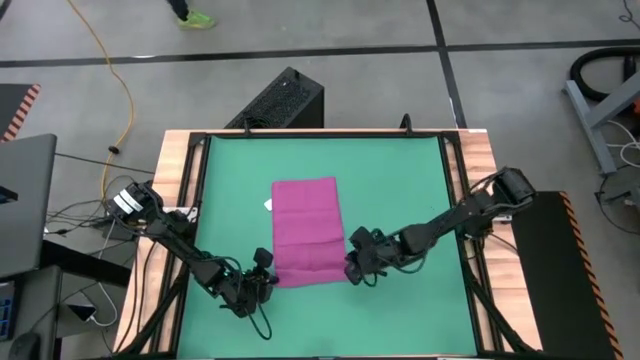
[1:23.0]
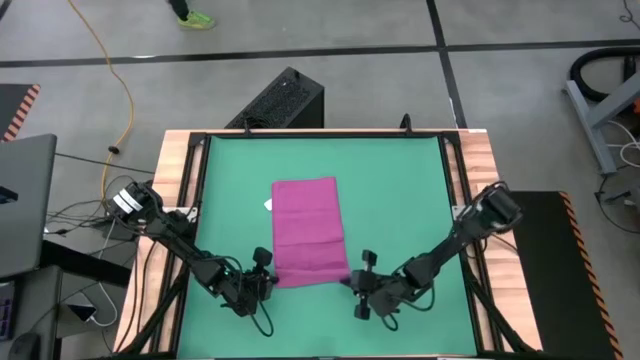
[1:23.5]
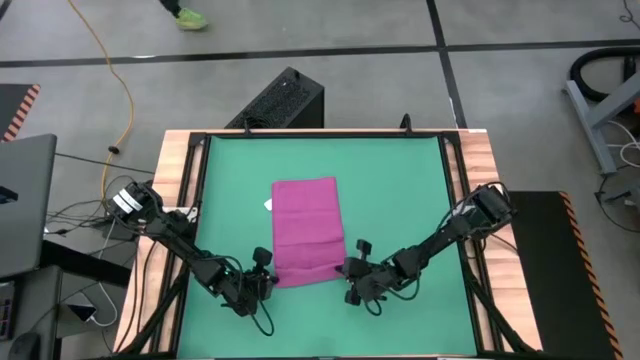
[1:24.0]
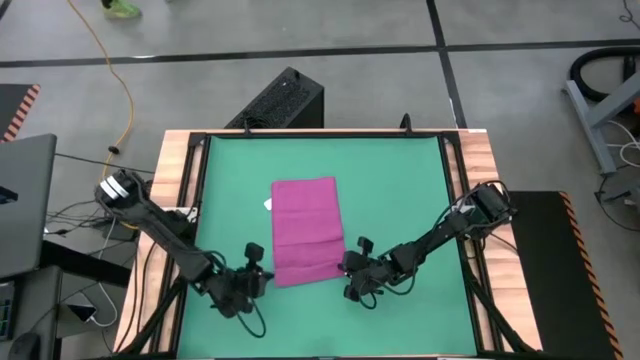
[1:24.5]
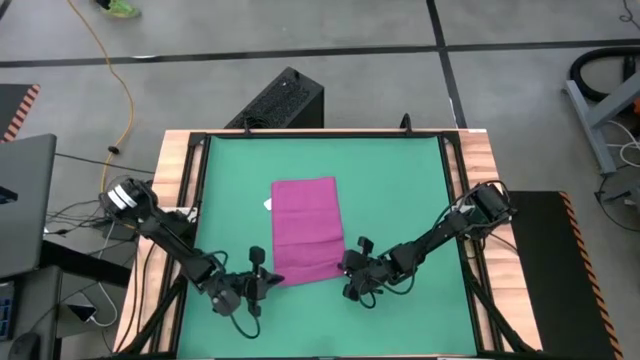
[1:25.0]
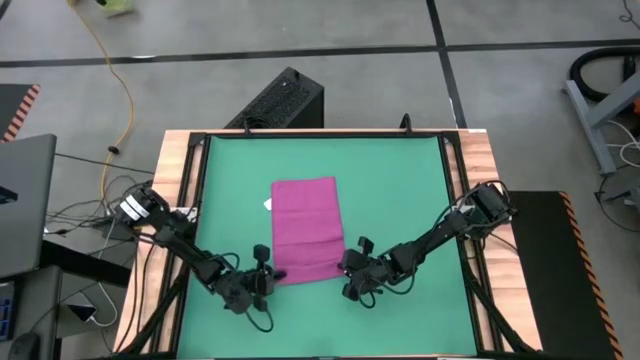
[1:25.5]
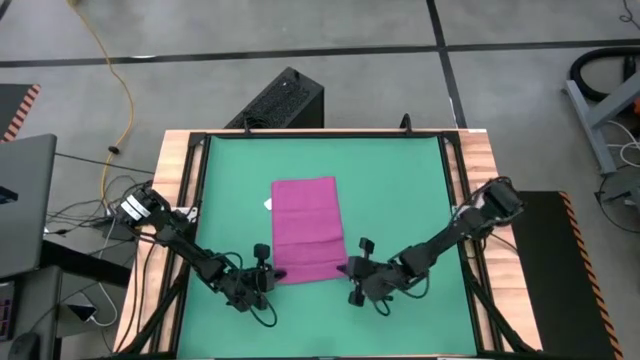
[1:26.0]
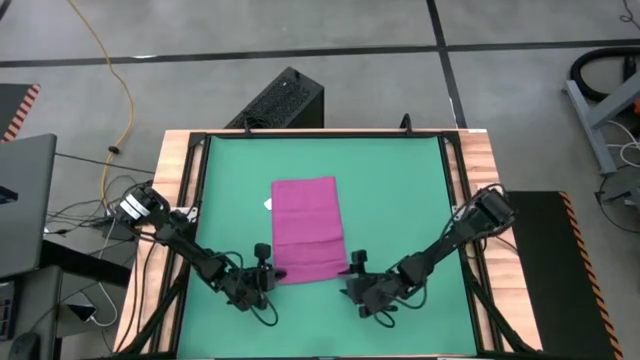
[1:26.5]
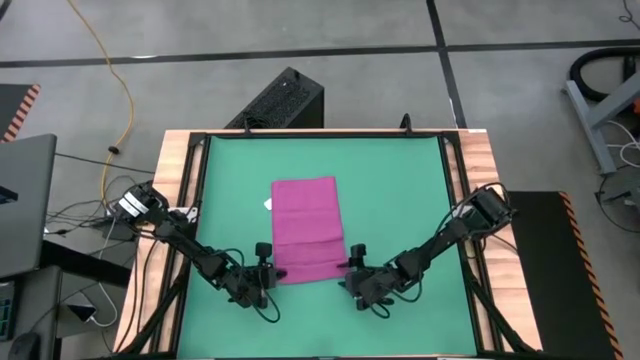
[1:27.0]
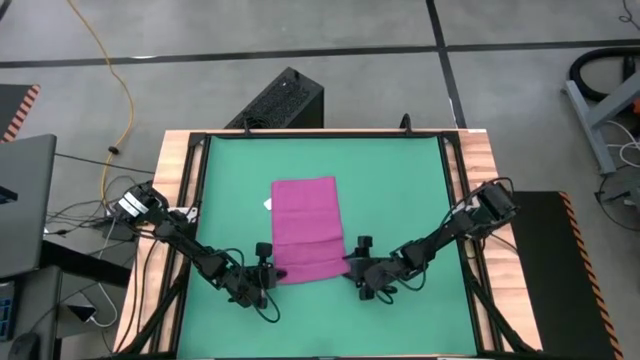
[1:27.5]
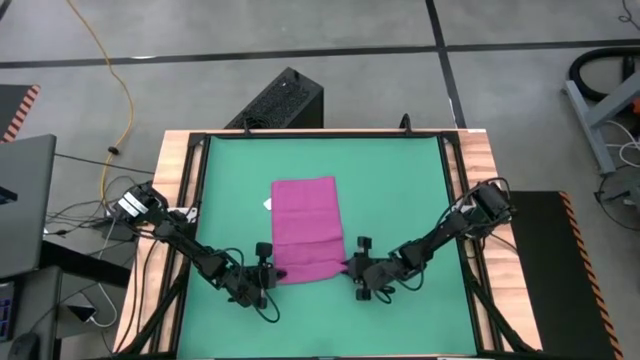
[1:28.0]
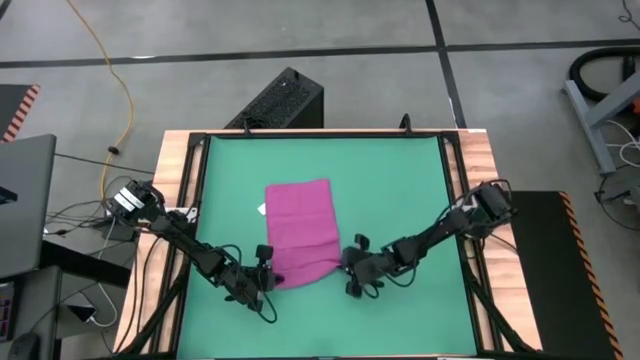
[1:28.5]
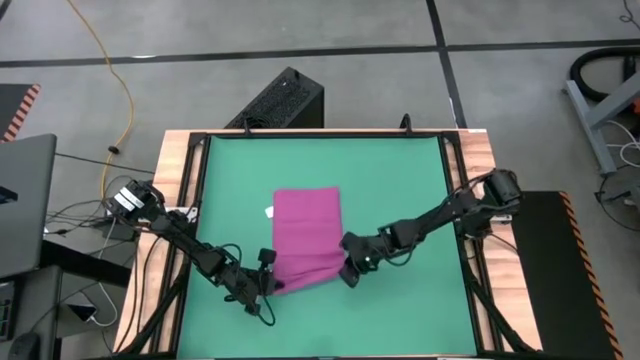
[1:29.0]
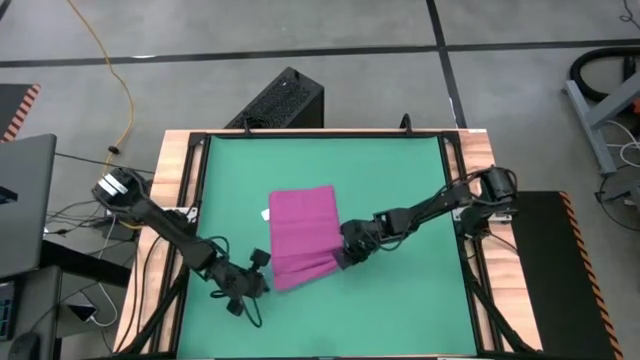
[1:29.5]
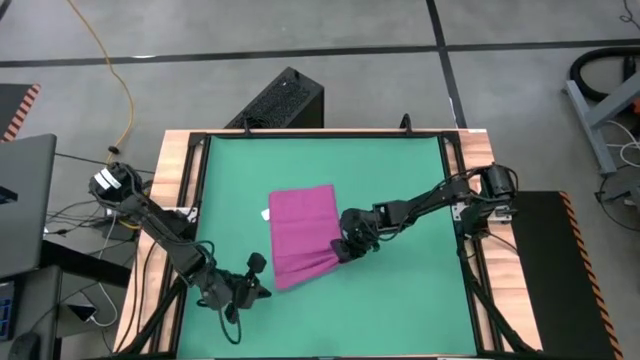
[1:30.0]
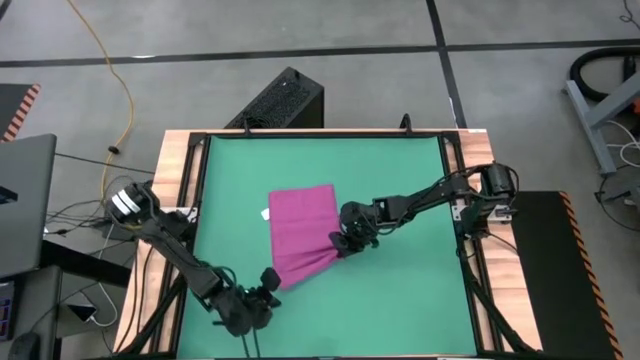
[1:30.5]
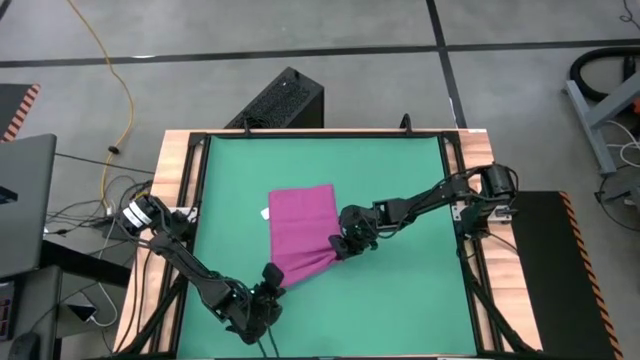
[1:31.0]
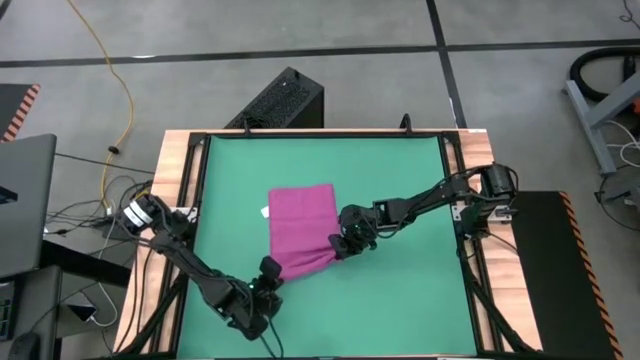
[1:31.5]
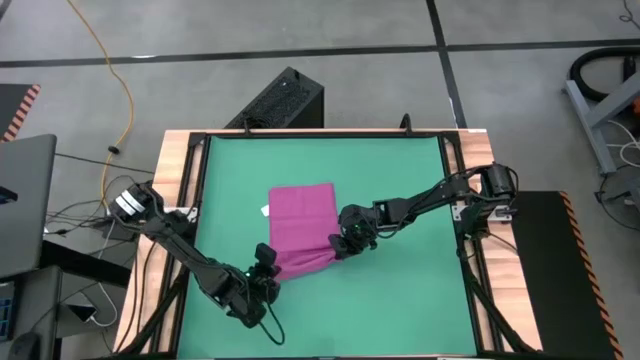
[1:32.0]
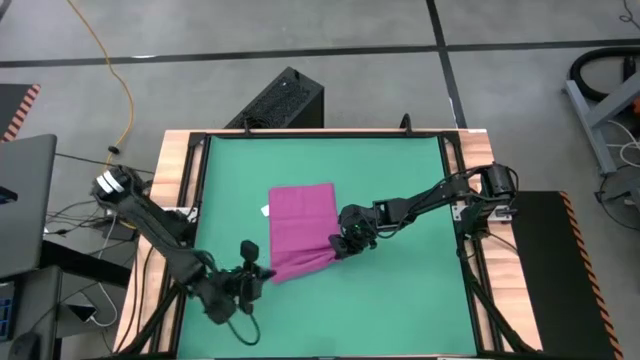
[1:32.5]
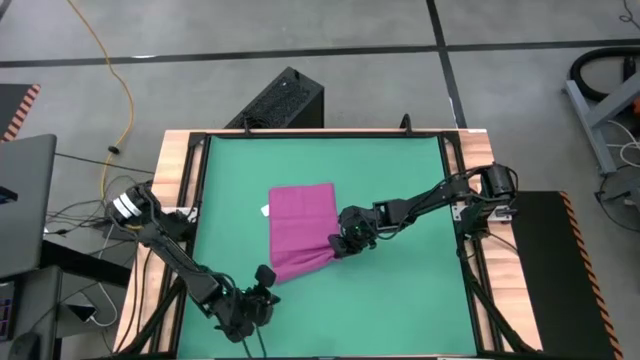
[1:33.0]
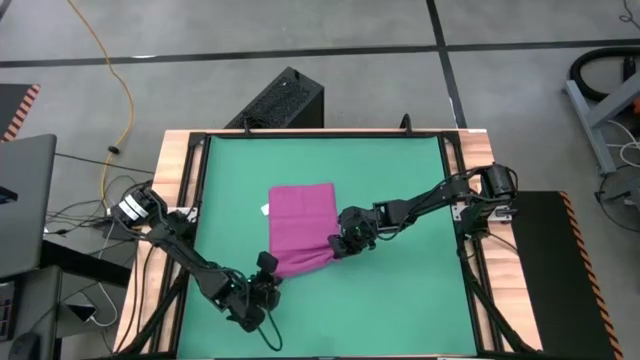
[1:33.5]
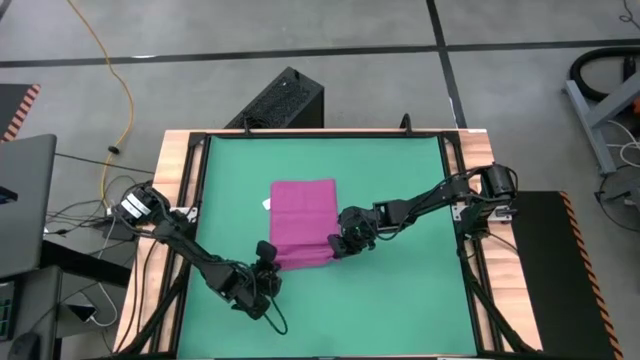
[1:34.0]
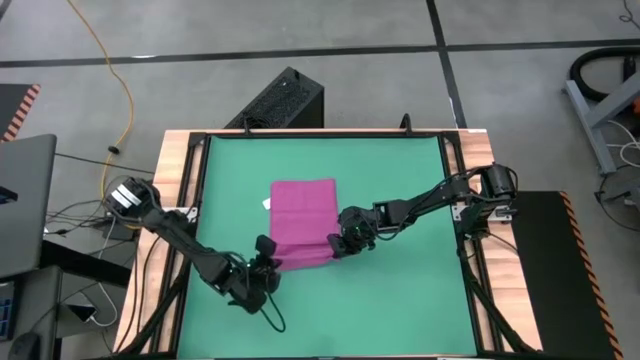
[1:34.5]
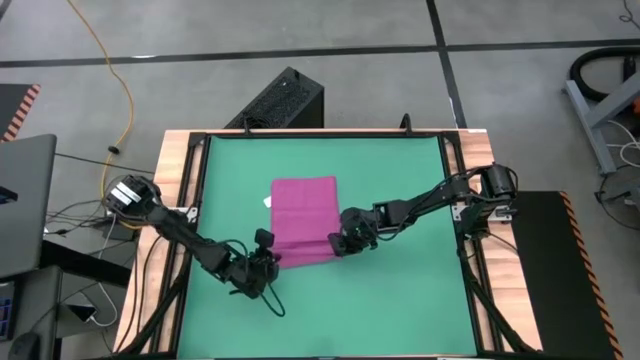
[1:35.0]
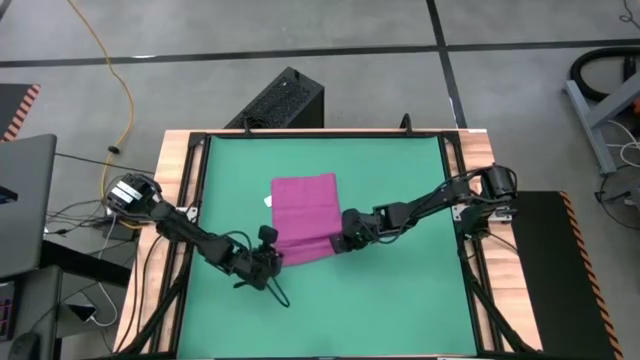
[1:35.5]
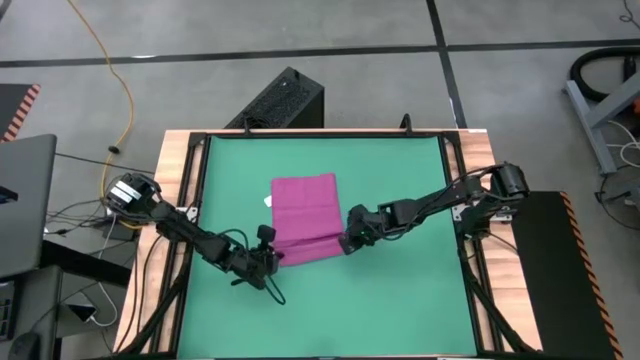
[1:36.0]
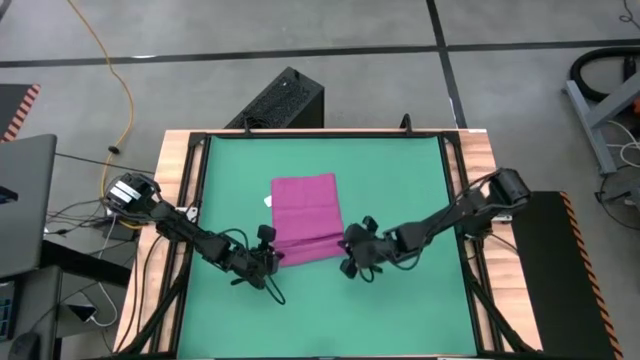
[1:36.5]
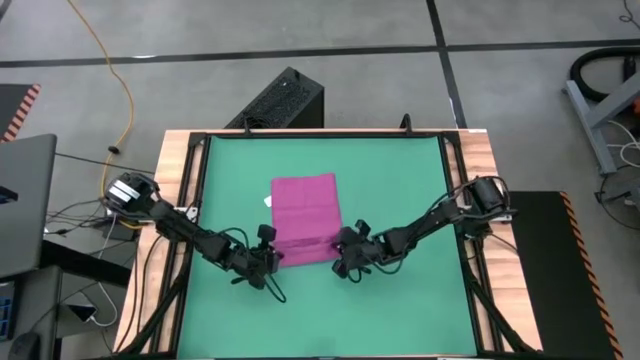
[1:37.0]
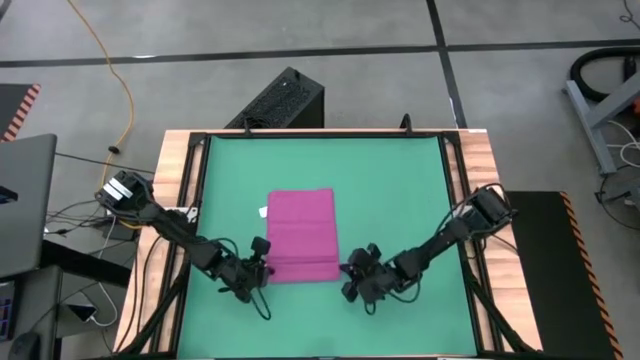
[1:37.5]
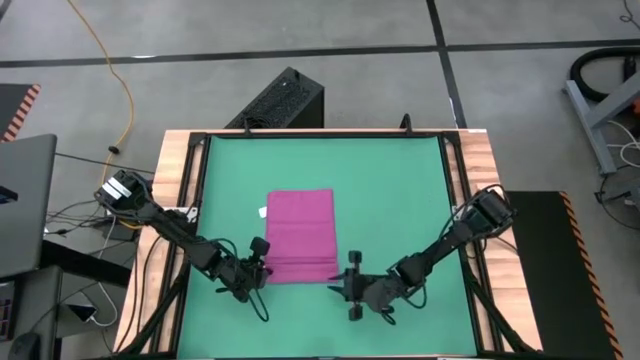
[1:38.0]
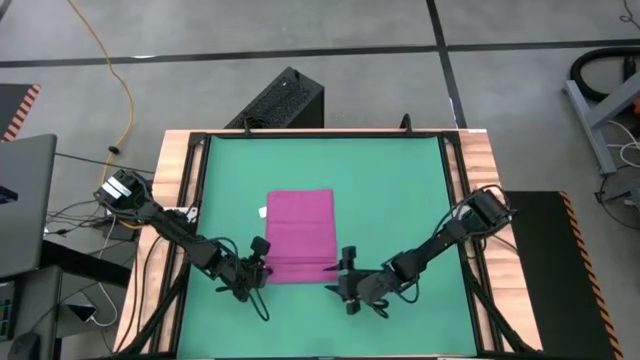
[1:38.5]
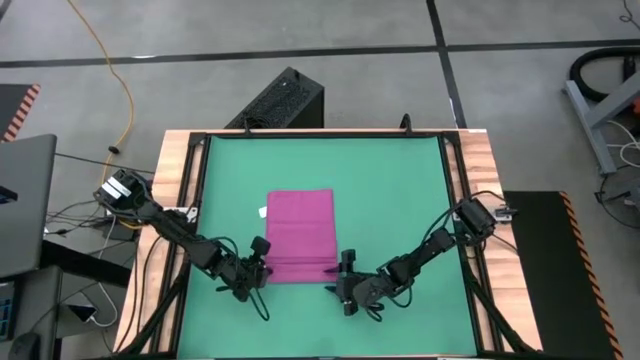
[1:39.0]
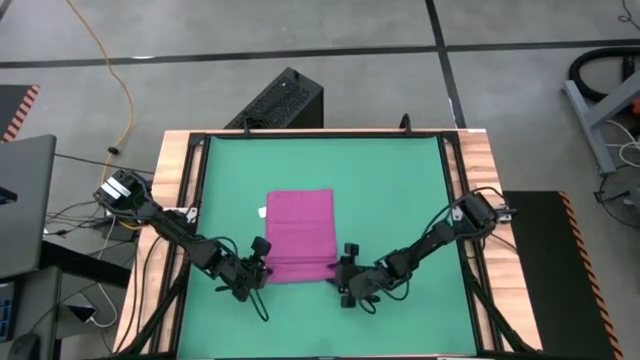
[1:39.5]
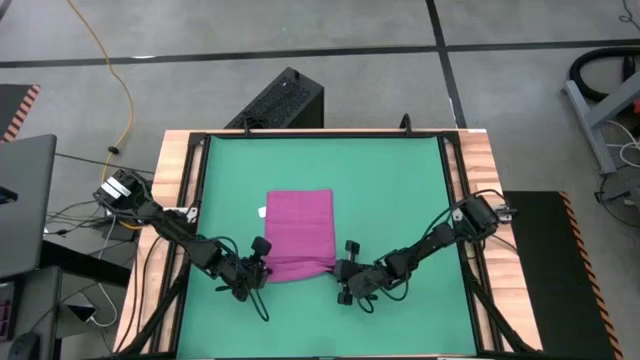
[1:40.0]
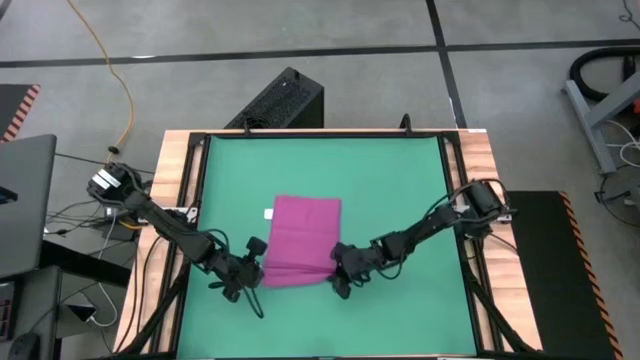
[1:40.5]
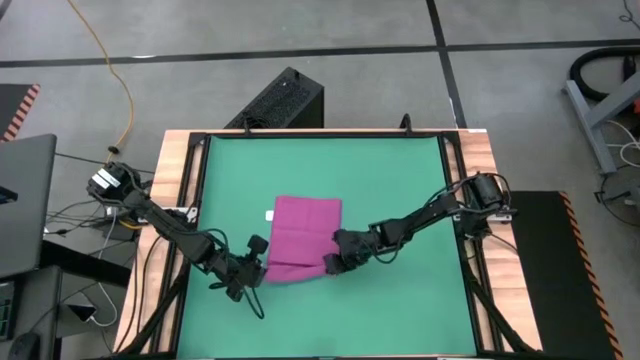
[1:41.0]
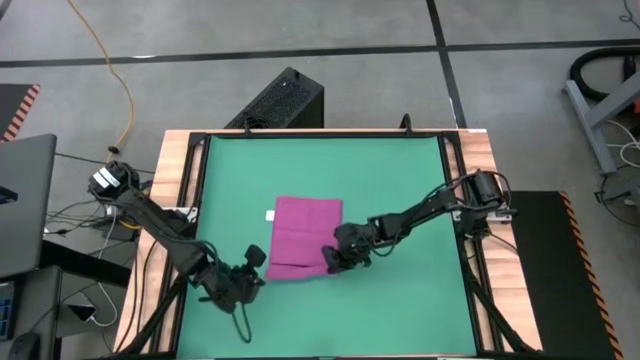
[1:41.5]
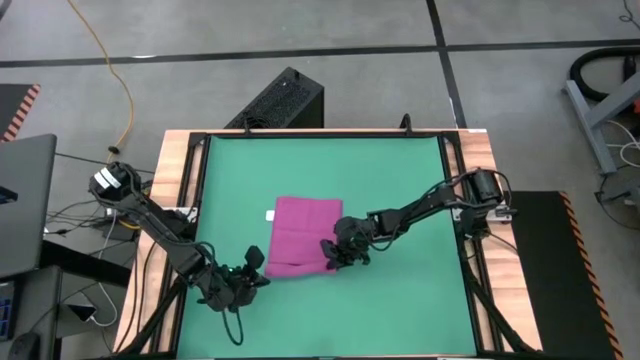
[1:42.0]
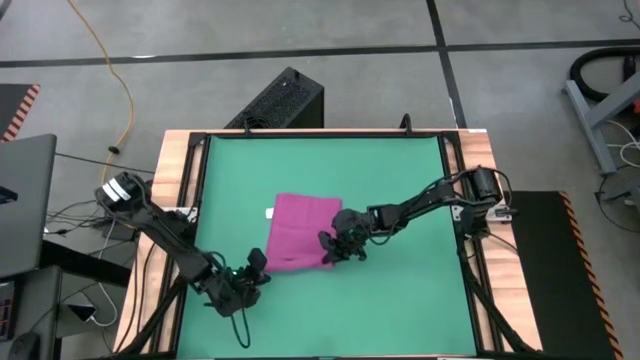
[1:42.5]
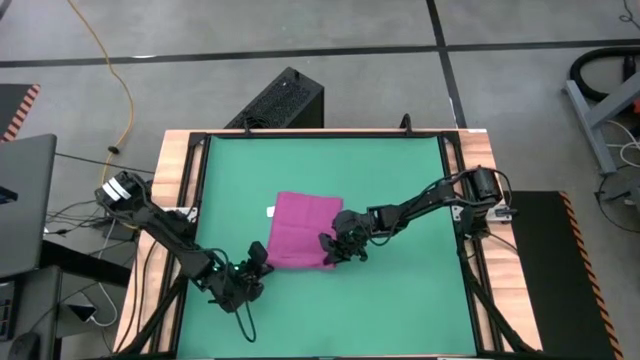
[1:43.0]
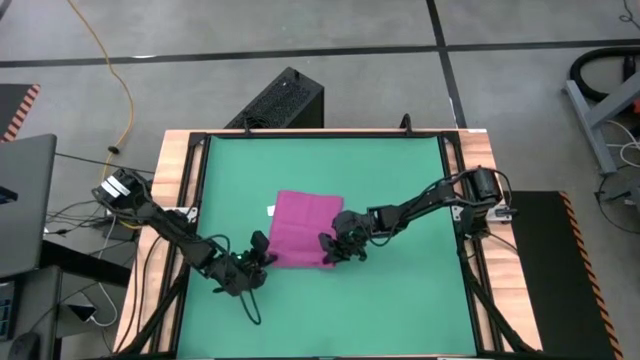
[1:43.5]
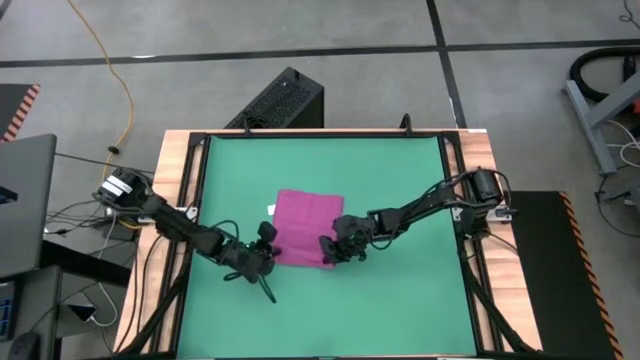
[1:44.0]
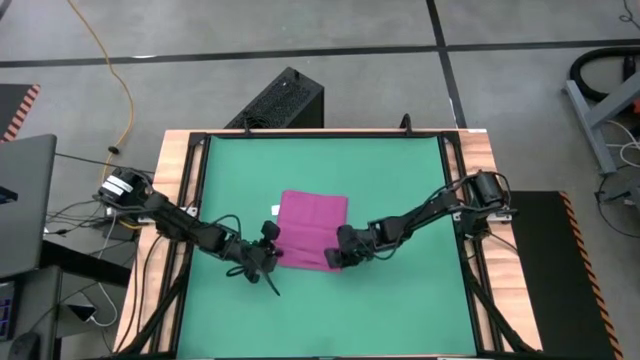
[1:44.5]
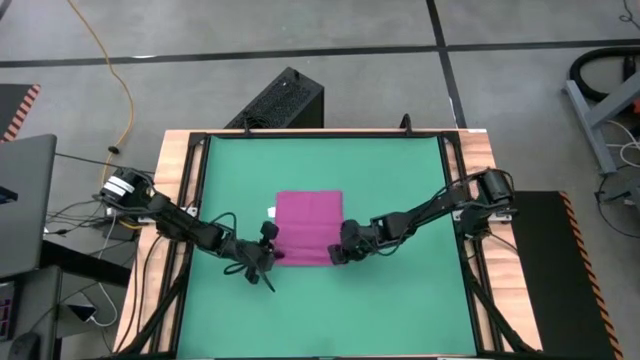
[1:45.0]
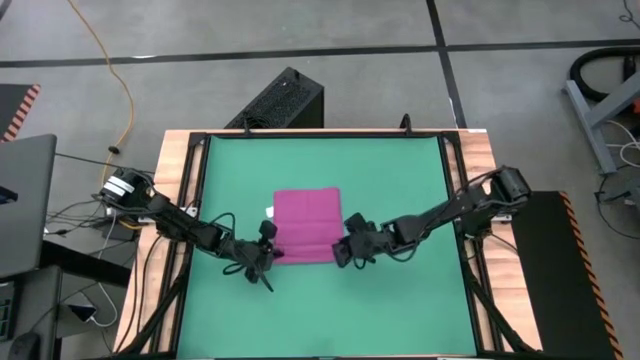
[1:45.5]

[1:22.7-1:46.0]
Task: Roll towel into tight, uniform cylinder
Roll the pink towel
